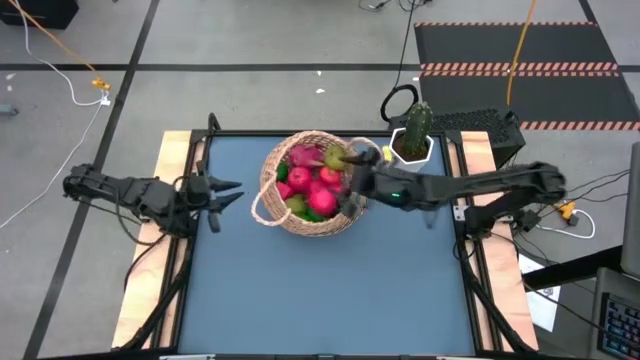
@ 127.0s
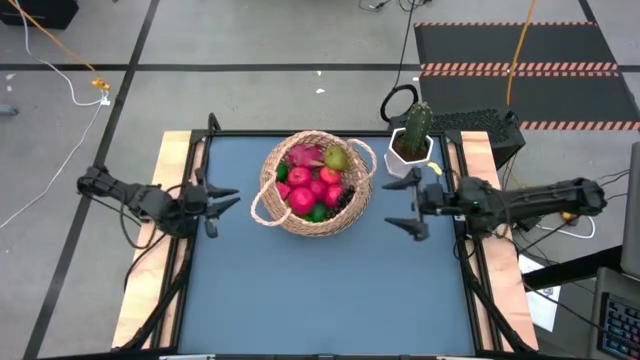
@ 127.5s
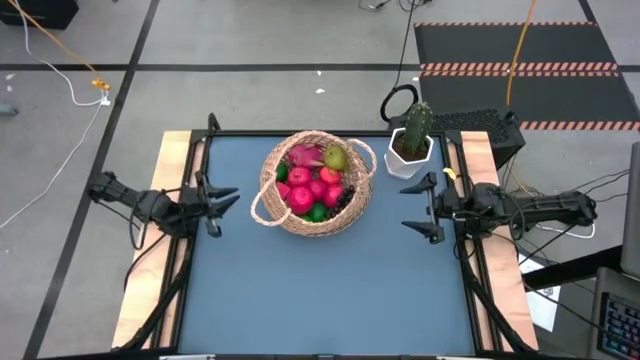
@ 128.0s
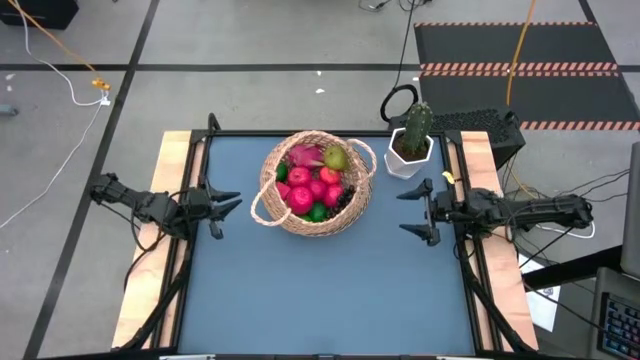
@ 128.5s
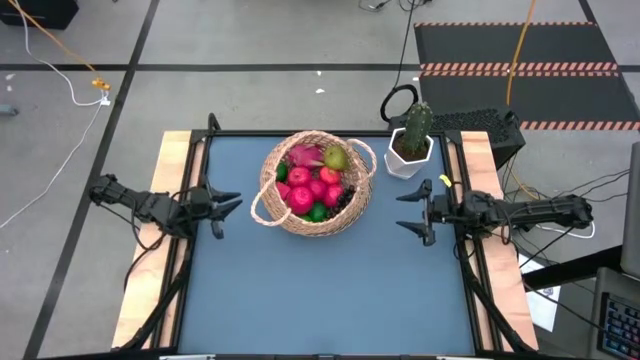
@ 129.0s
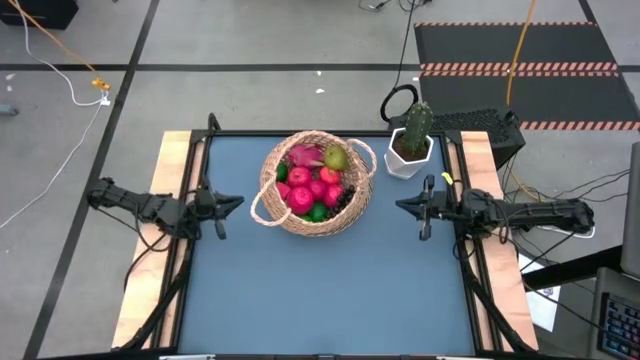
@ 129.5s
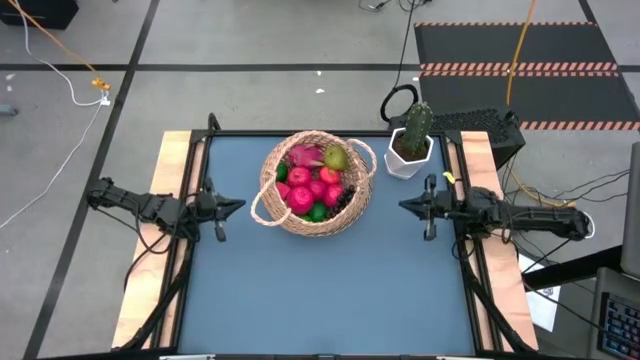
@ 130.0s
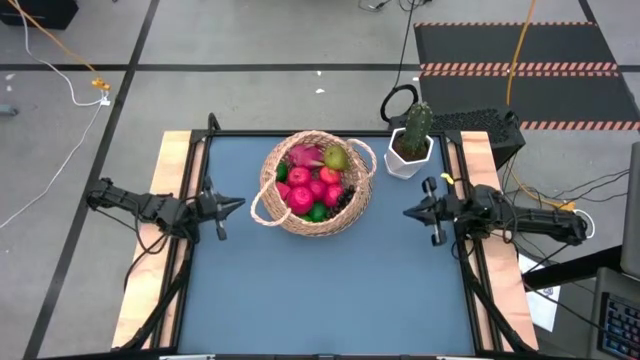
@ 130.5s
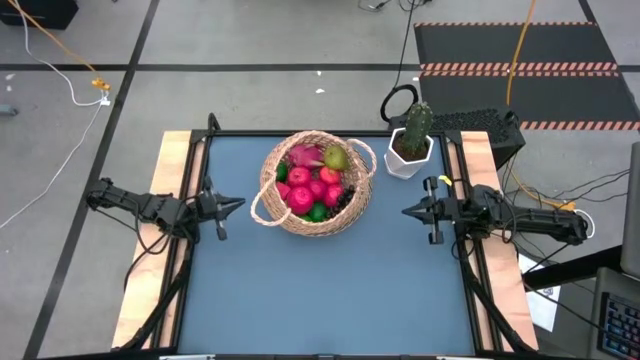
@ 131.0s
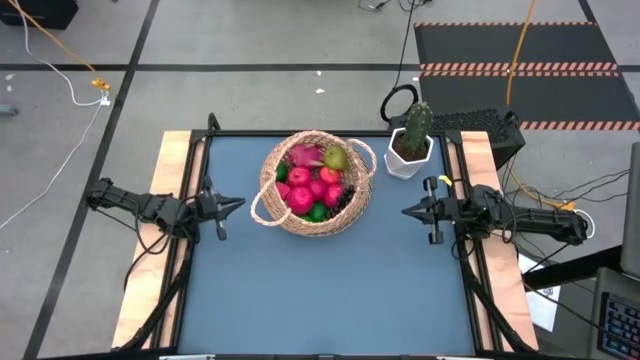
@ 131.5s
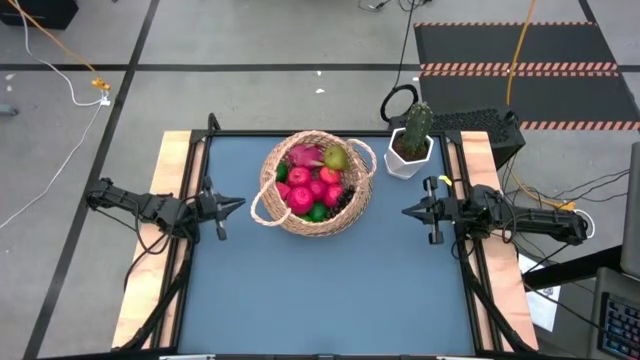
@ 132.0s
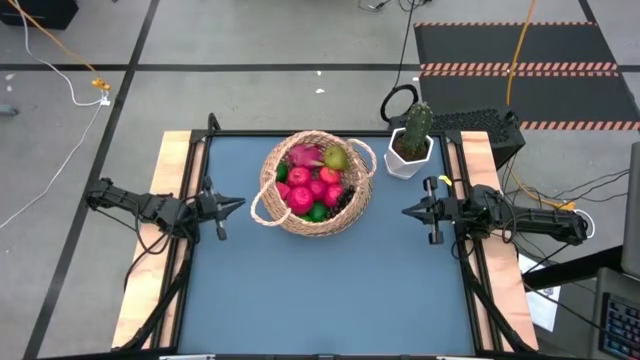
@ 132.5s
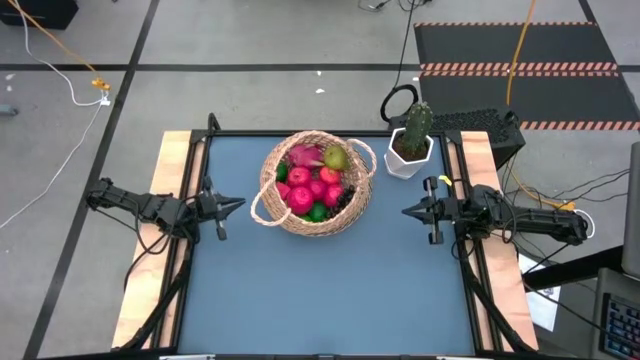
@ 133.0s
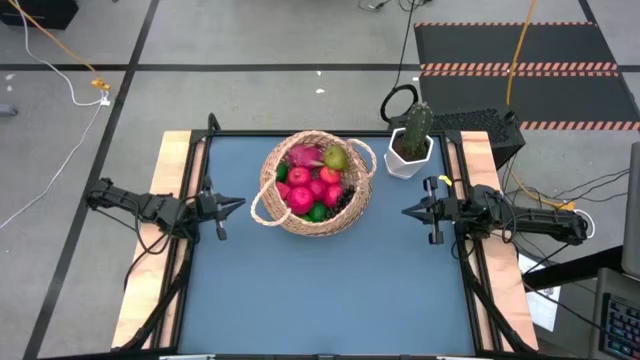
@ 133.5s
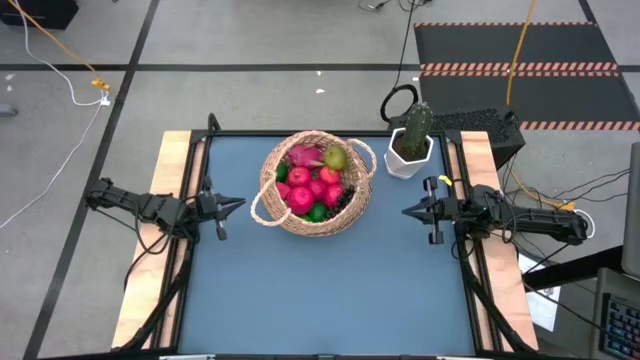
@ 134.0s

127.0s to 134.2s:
Task: Build produce basket
Return to Home Position

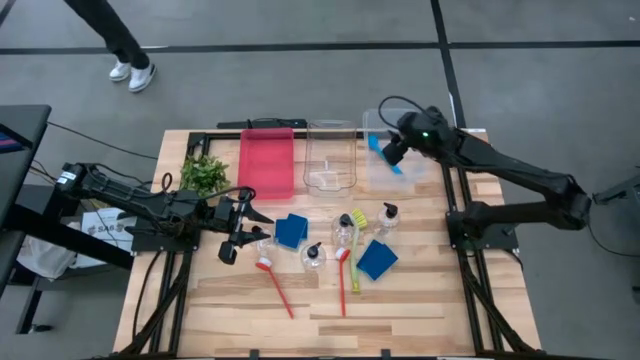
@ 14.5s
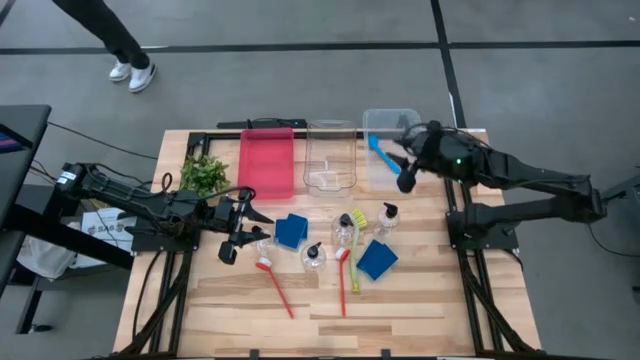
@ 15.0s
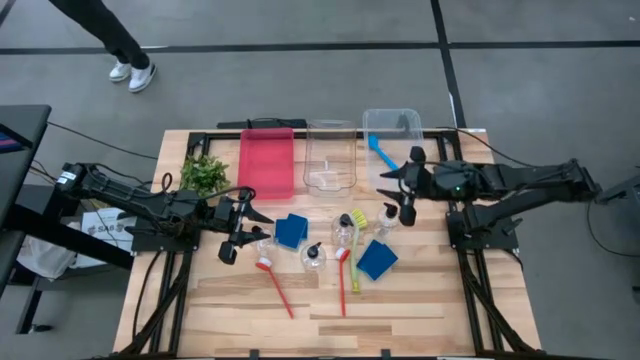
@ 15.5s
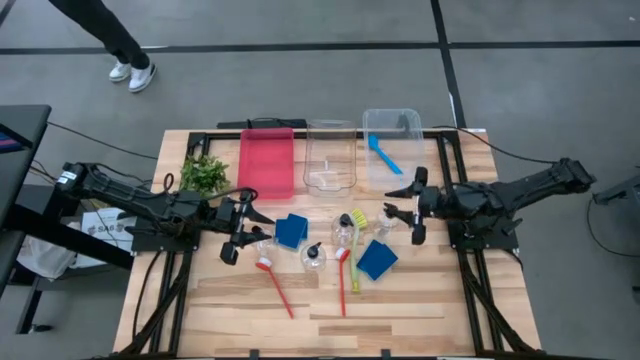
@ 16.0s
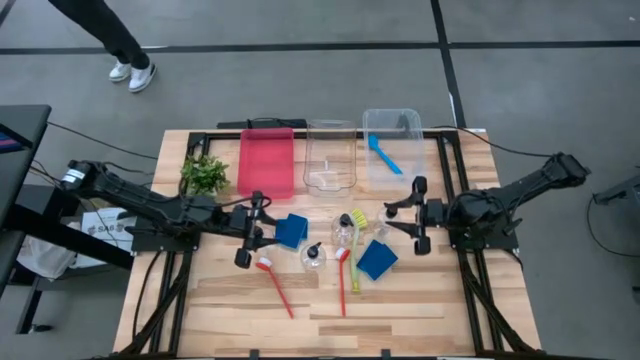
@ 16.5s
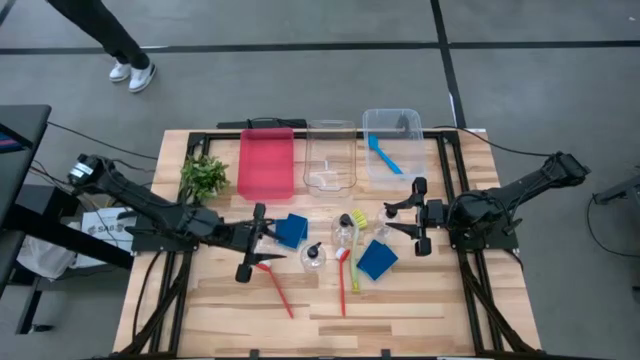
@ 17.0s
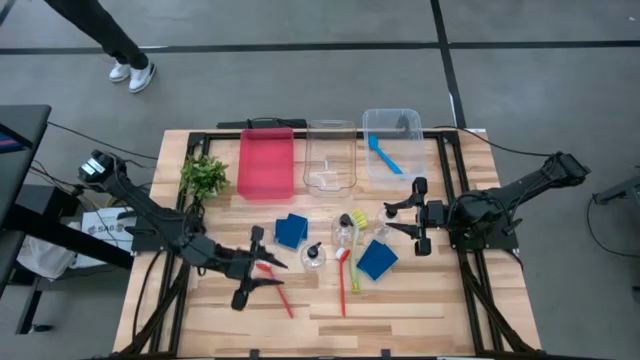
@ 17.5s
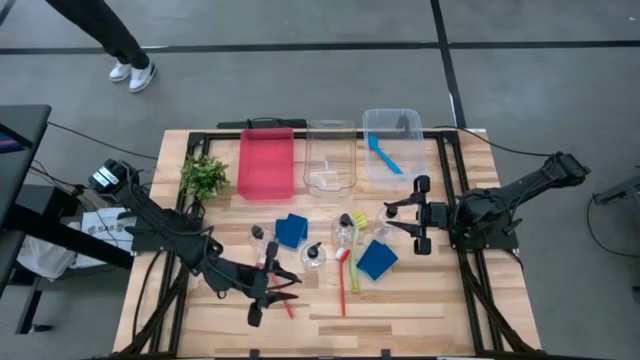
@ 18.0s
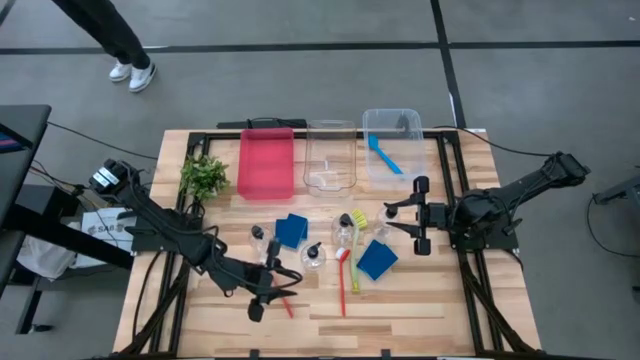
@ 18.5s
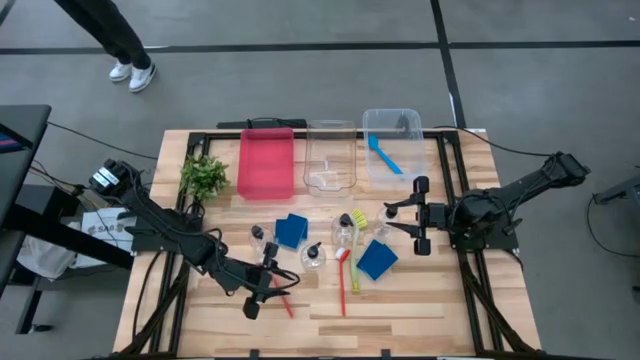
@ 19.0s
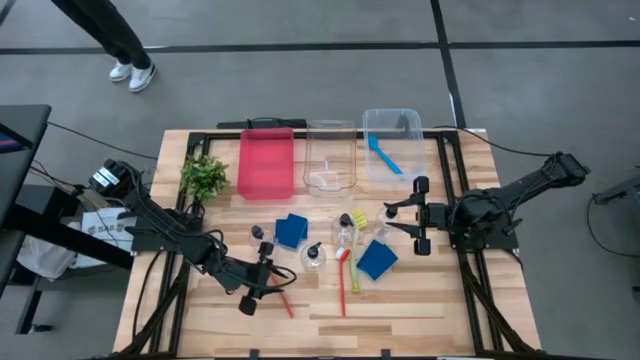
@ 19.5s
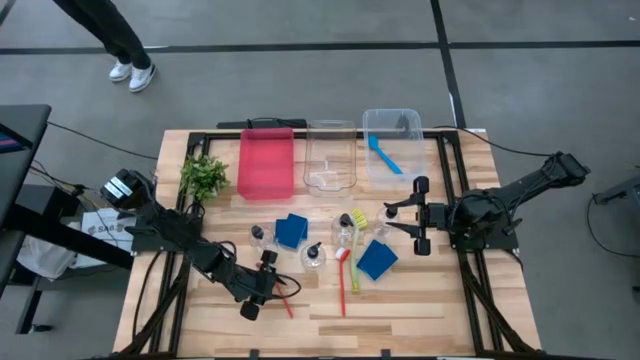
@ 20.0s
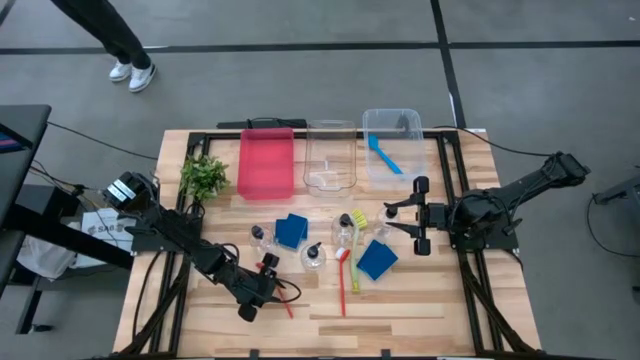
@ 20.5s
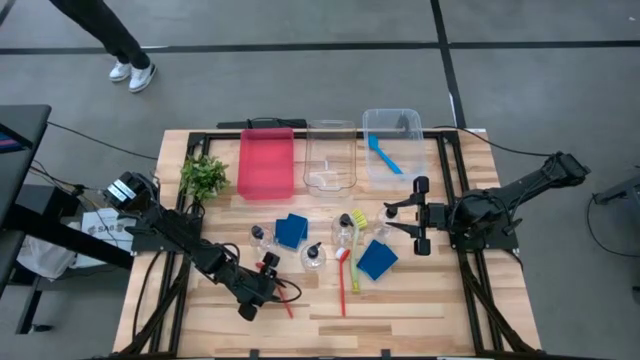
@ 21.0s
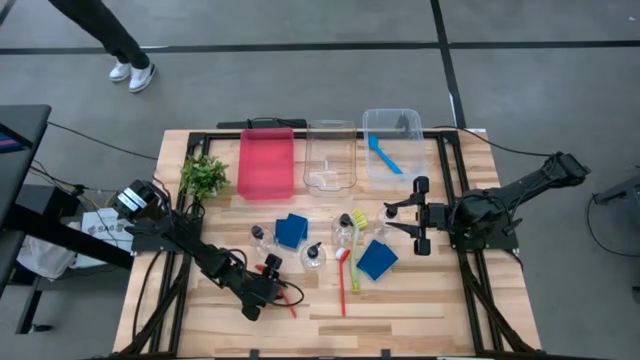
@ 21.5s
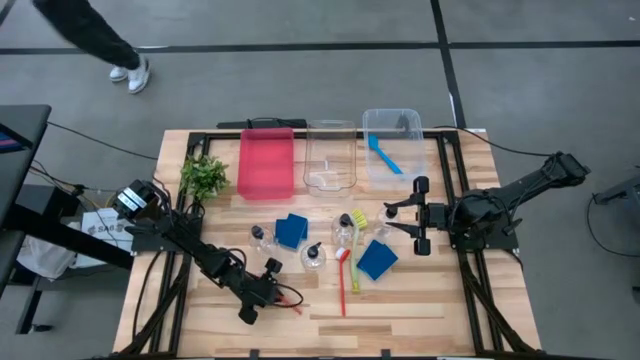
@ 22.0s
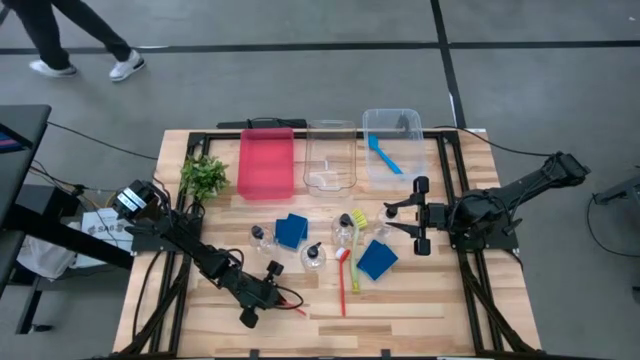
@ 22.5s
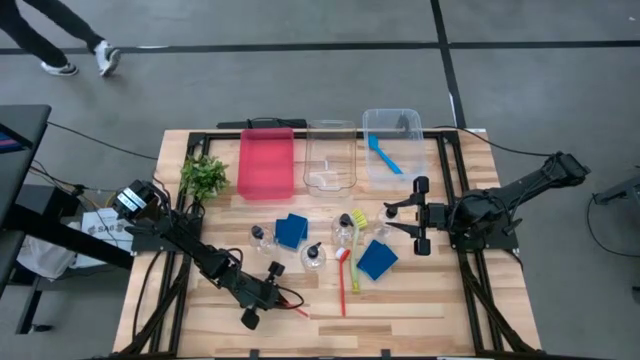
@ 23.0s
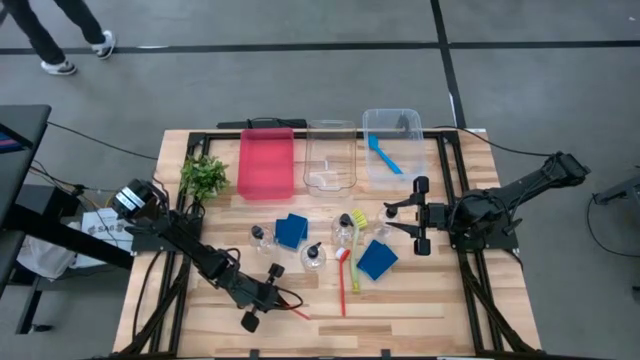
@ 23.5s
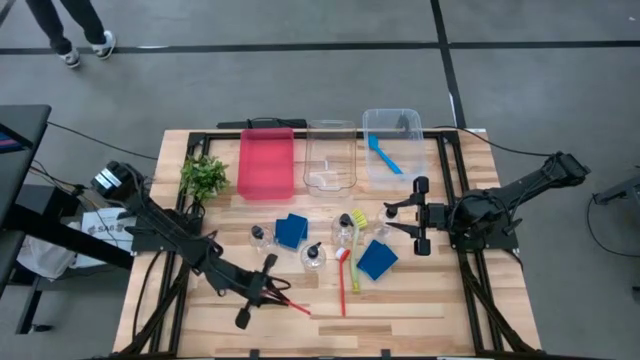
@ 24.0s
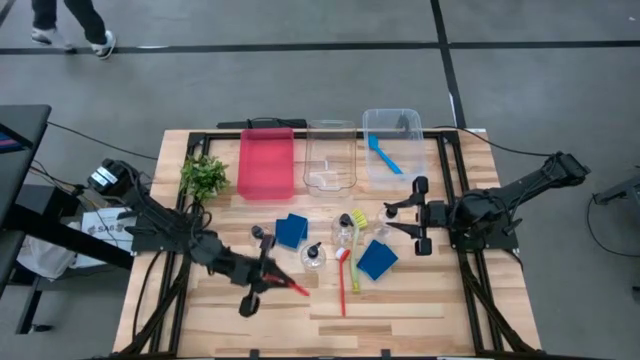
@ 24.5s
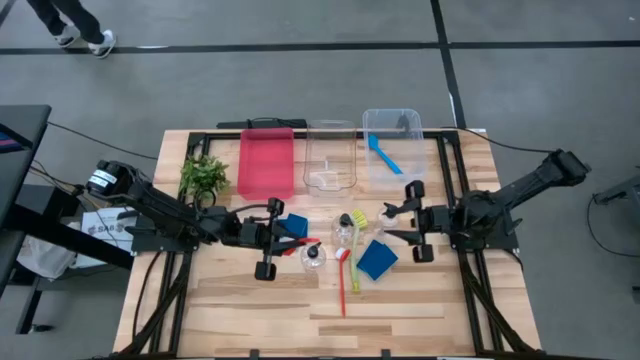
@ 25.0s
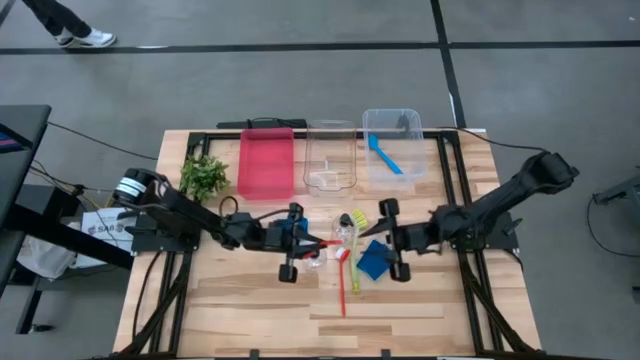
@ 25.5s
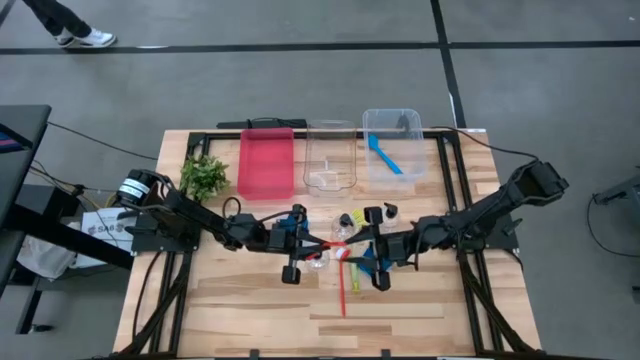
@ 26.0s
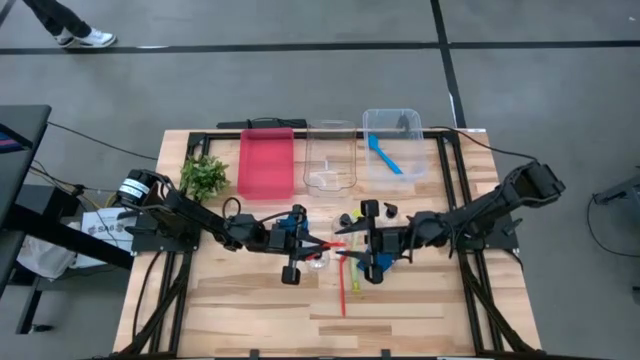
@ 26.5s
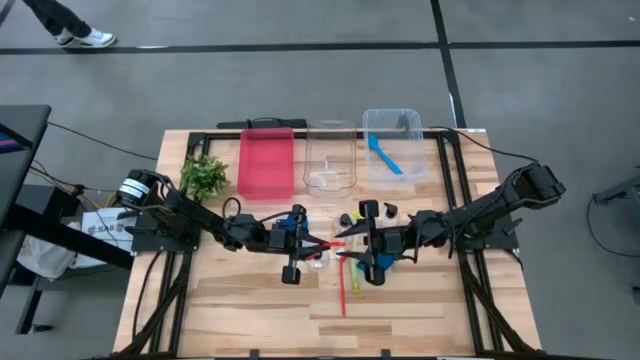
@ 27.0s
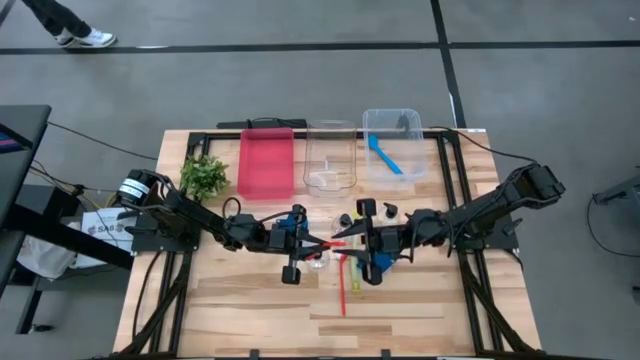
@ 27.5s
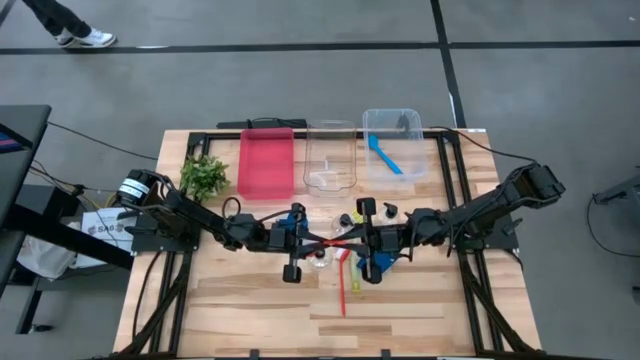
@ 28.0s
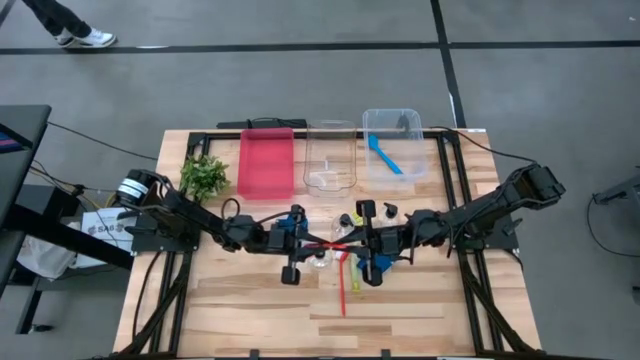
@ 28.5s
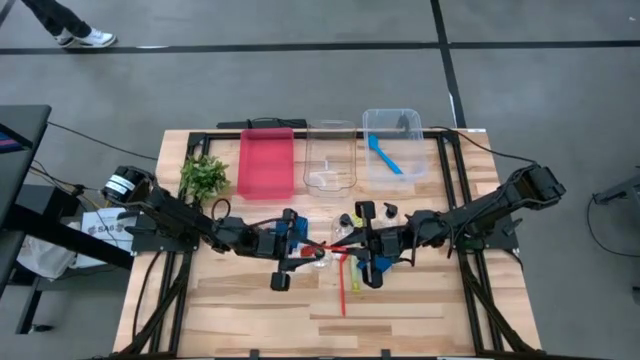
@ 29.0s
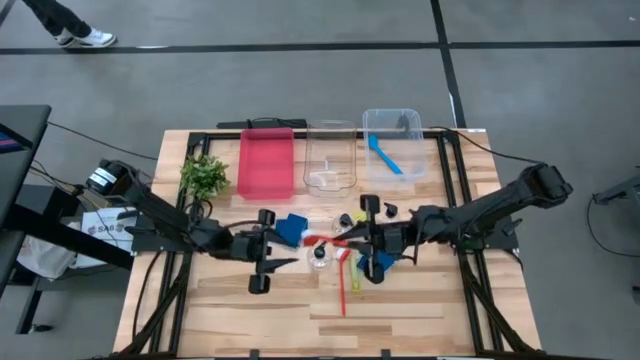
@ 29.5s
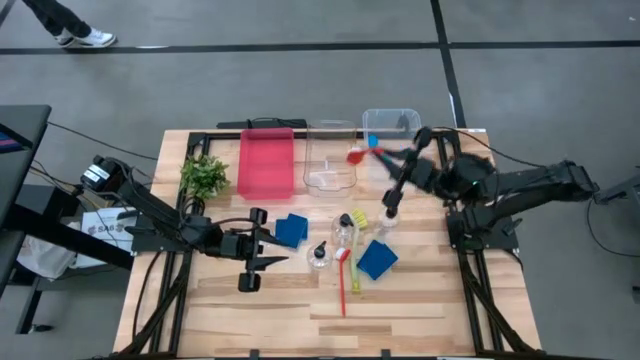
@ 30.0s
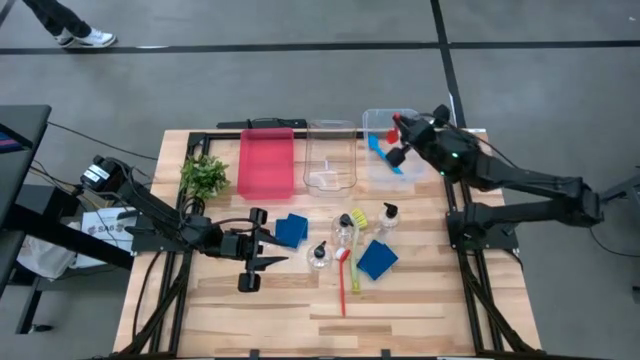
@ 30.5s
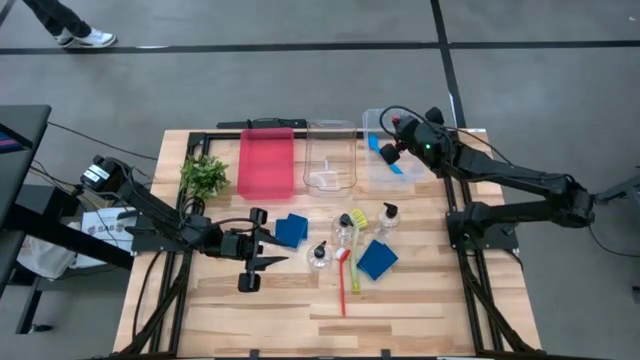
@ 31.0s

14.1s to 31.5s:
Task: Pick & Place Kitchen Sink Supplies
Put the red dishwashing brush into the white transparent bin
